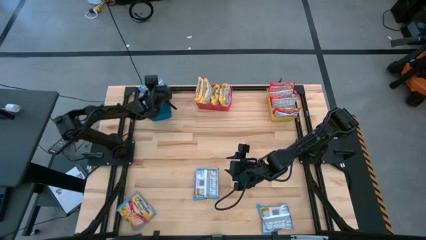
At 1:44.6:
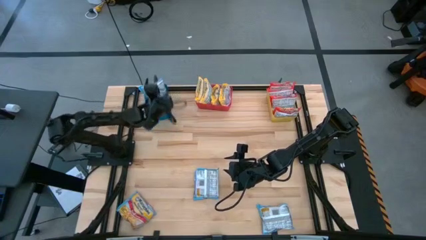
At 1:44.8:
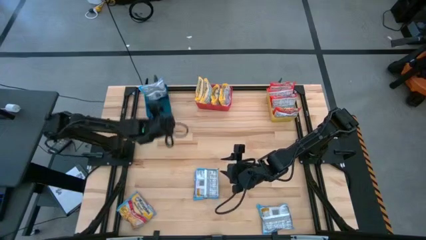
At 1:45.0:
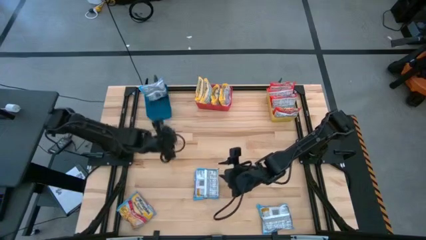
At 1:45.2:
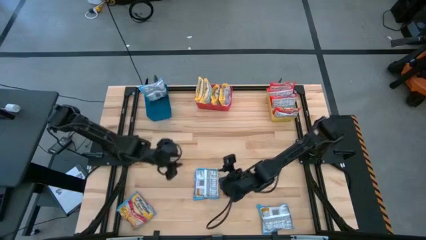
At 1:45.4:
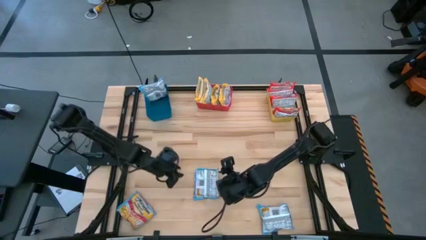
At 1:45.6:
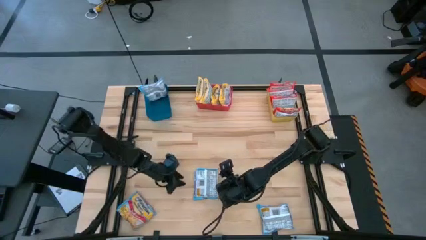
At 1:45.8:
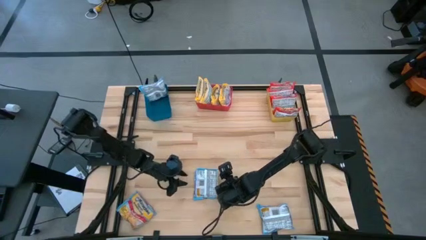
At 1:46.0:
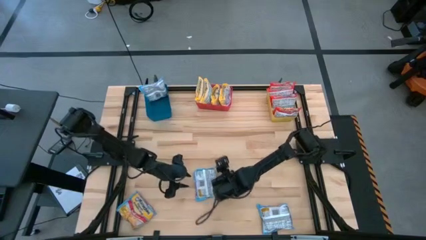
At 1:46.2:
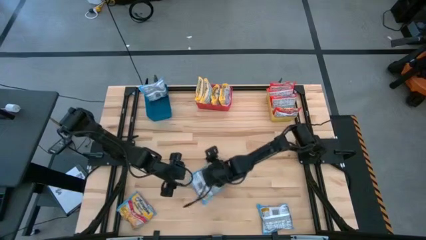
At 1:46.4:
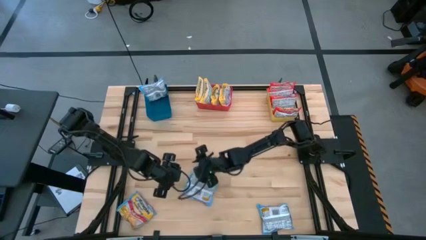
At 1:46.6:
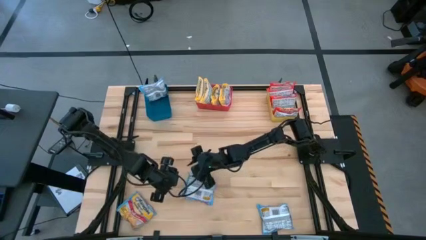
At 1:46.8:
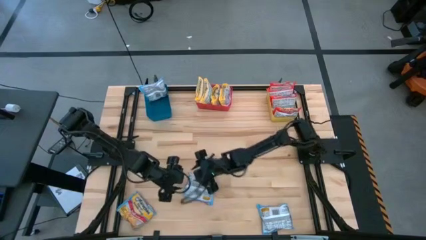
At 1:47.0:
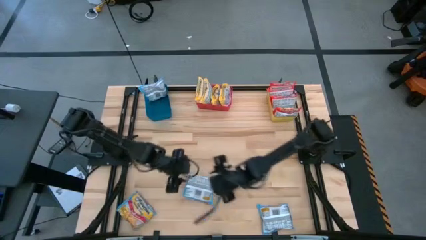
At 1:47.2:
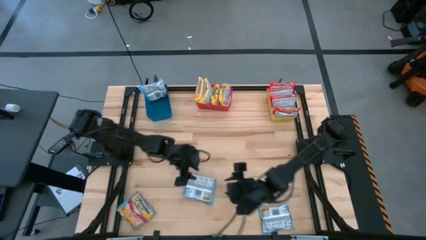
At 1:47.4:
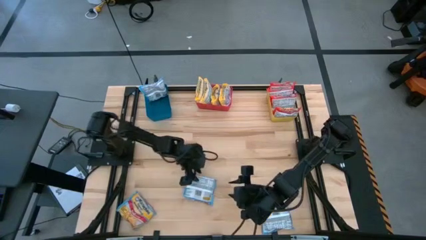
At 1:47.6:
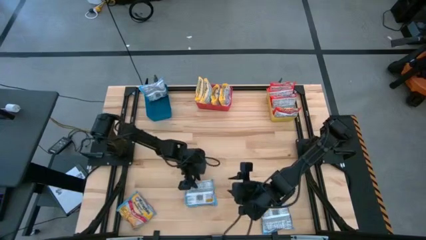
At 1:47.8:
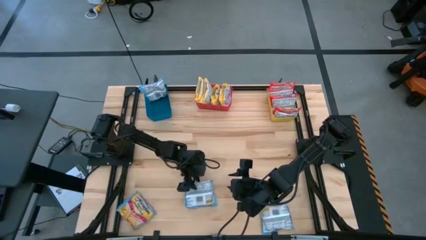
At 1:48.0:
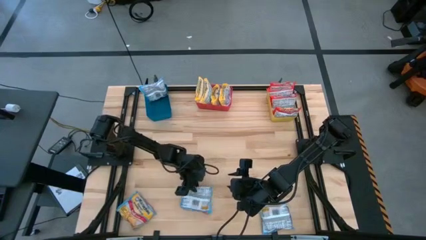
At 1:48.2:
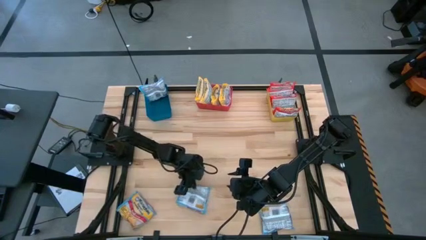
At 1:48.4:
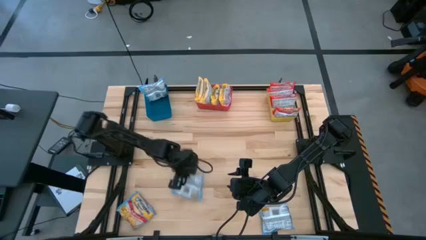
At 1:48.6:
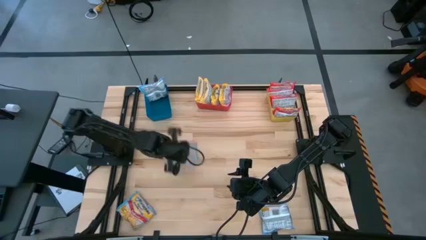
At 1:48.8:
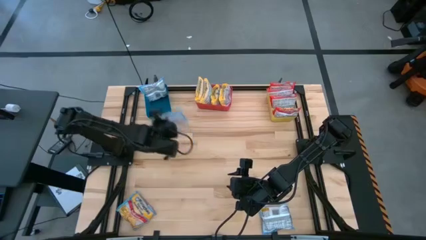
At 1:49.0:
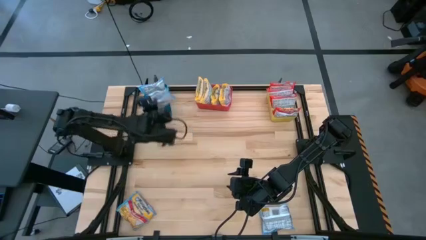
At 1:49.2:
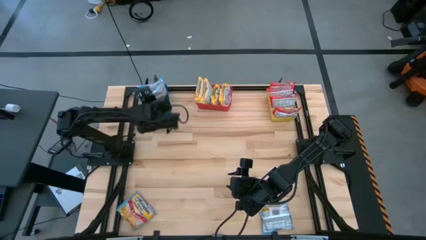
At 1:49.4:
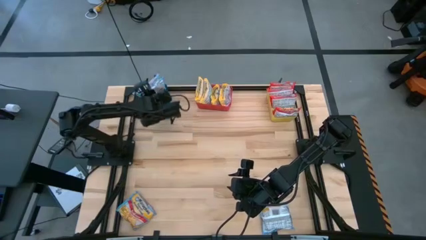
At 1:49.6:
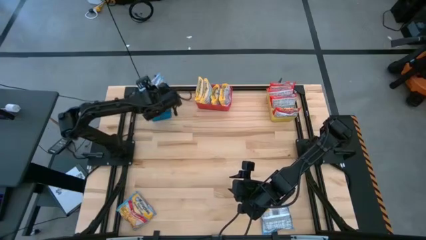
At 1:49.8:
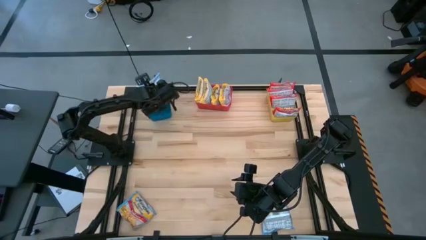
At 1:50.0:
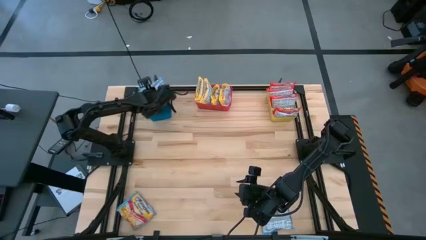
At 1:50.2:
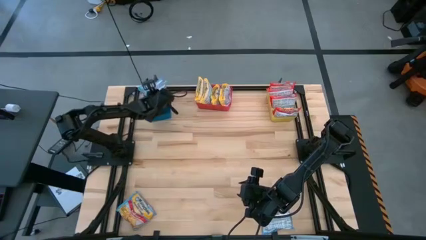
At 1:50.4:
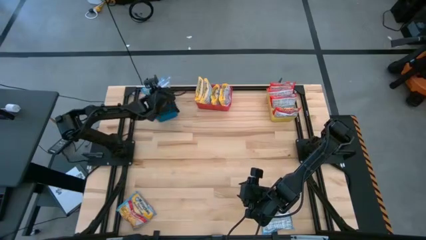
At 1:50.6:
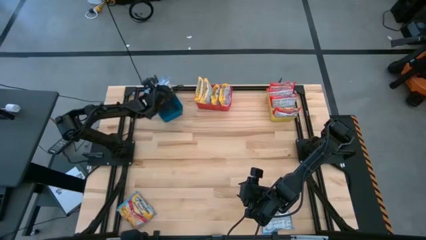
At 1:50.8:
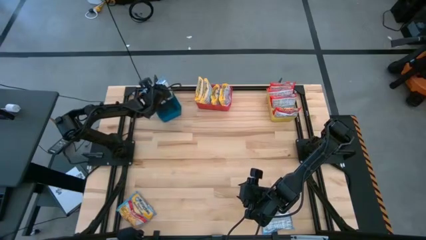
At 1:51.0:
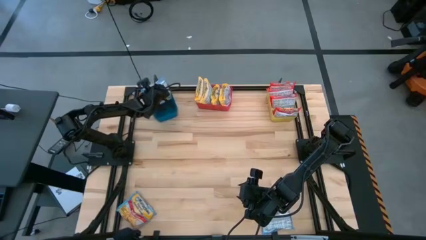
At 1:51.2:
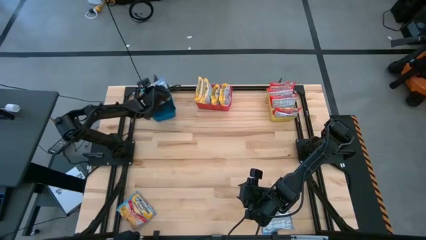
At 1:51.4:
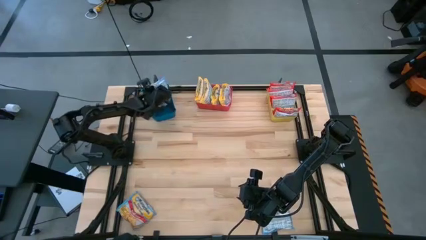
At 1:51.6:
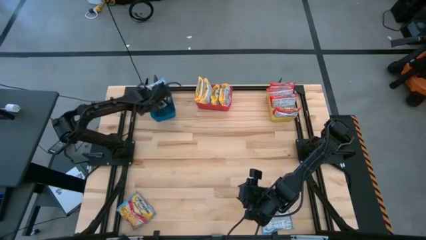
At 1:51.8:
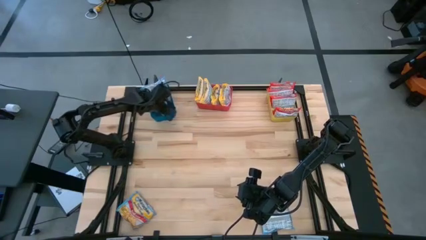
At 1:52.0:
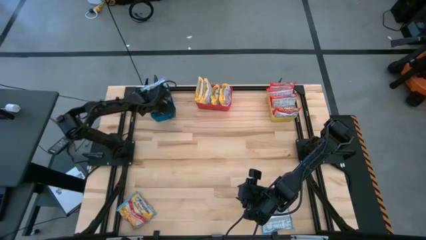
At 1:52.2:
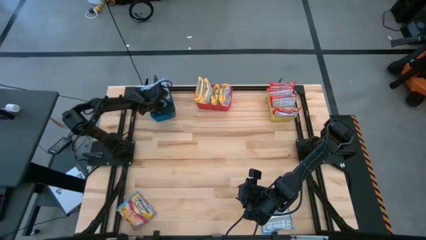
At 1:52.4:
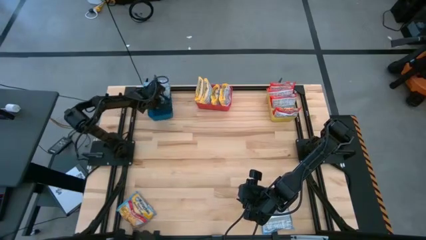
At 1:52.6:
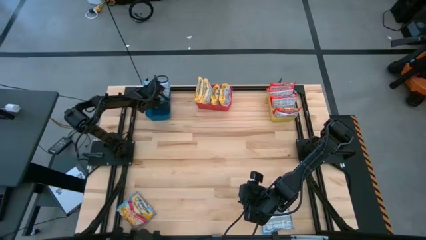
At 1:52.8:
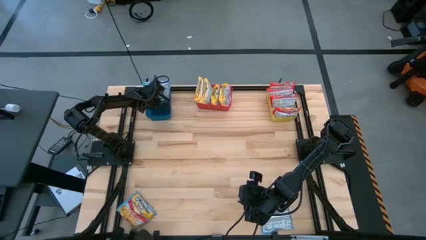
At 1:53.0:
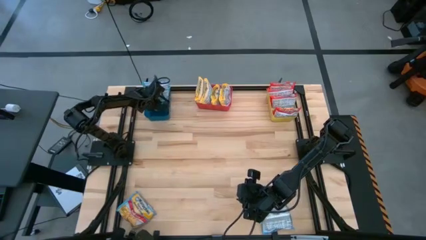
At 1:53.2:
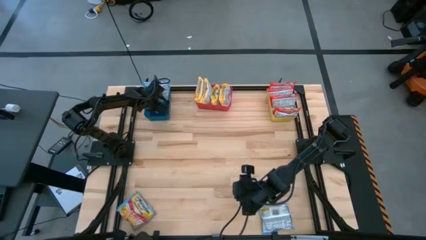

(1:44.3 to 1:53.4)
Task: Sort Maruchan noodles
Put the top blue noodle pack into the blue bin
